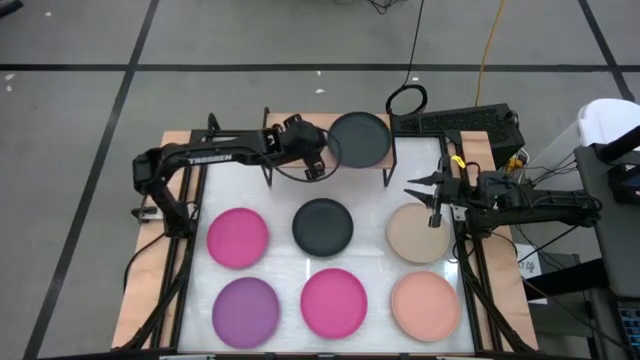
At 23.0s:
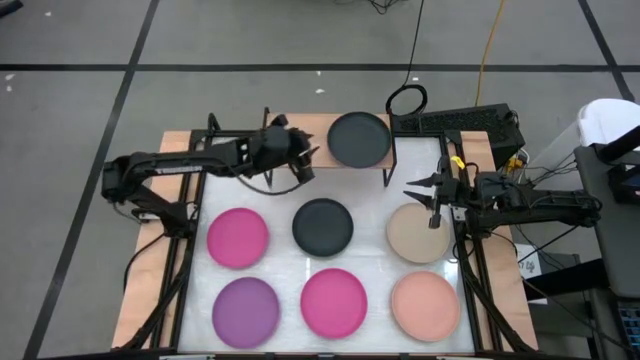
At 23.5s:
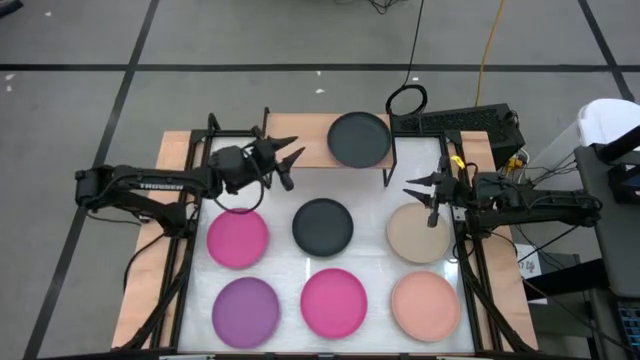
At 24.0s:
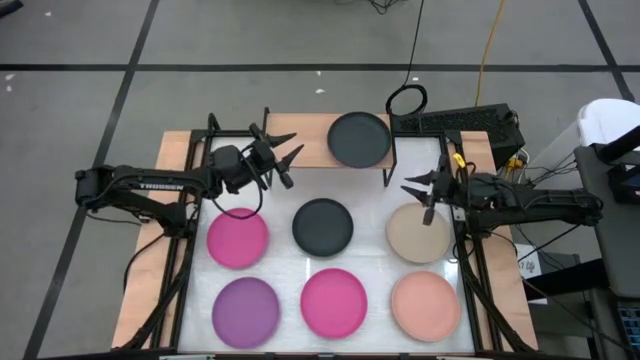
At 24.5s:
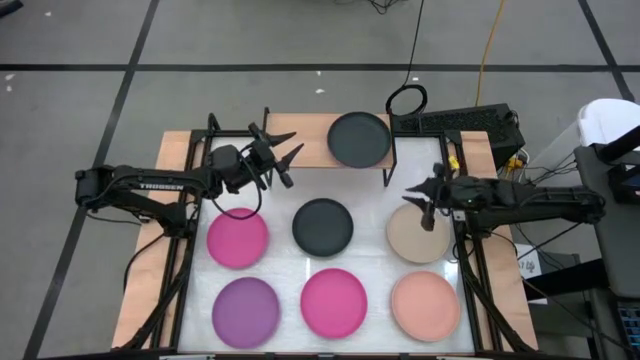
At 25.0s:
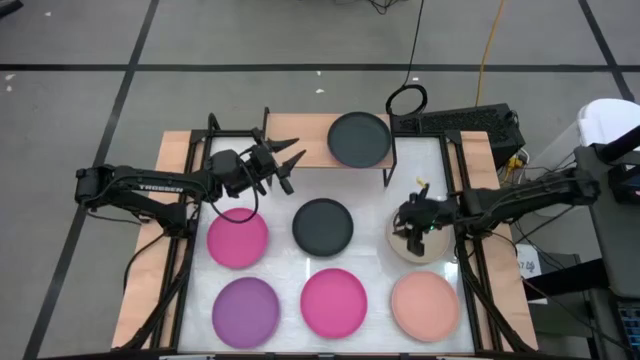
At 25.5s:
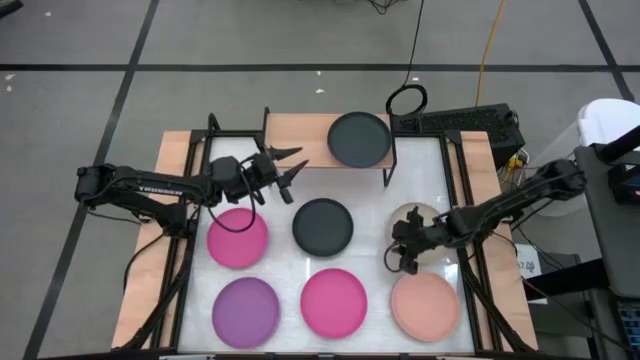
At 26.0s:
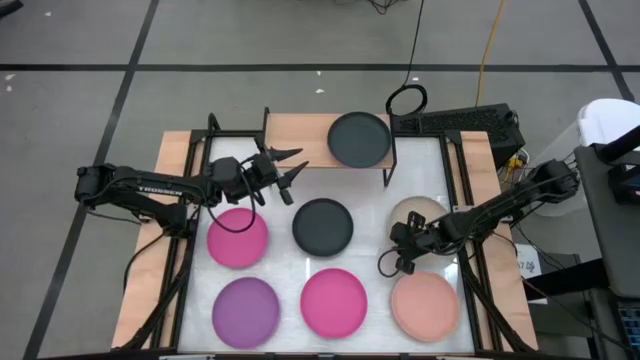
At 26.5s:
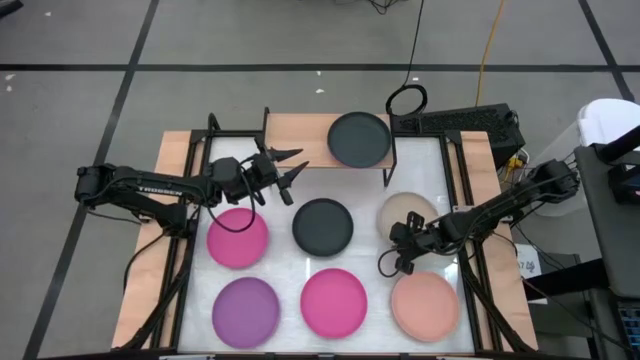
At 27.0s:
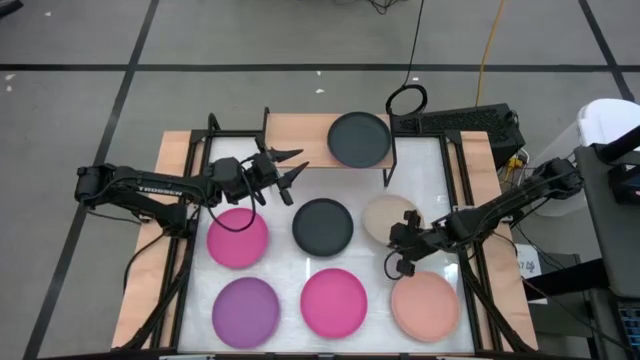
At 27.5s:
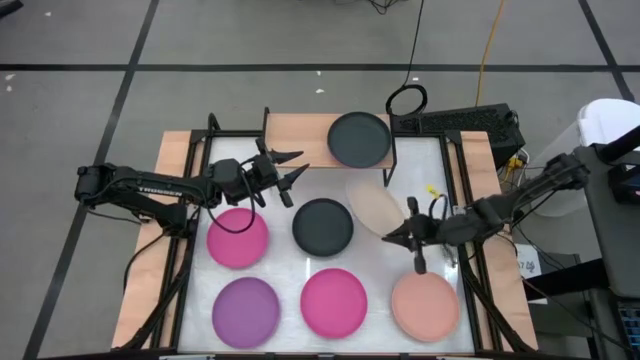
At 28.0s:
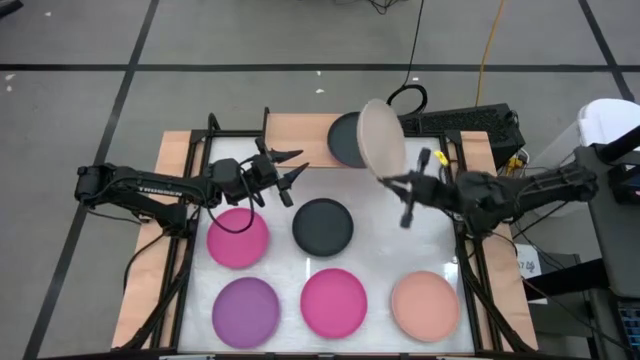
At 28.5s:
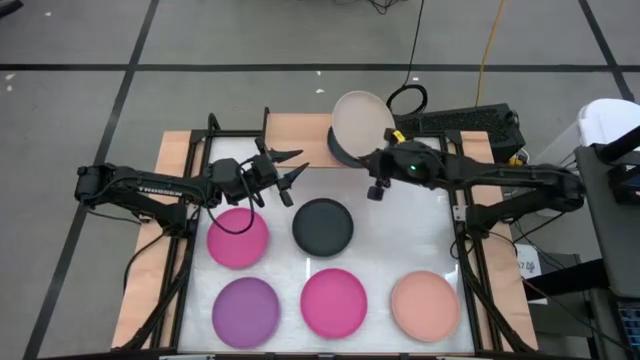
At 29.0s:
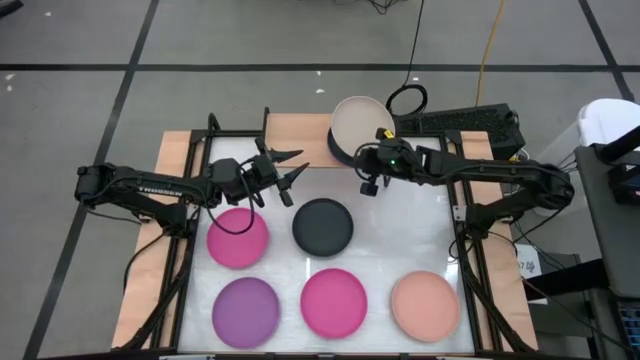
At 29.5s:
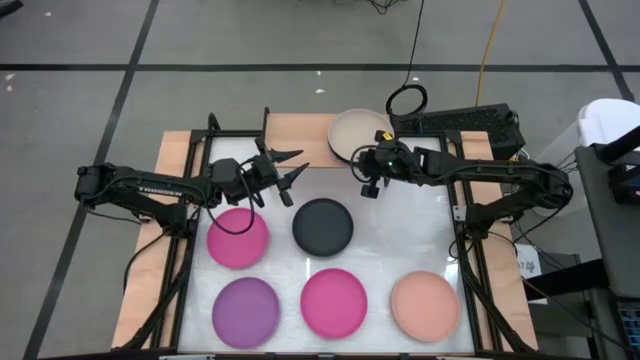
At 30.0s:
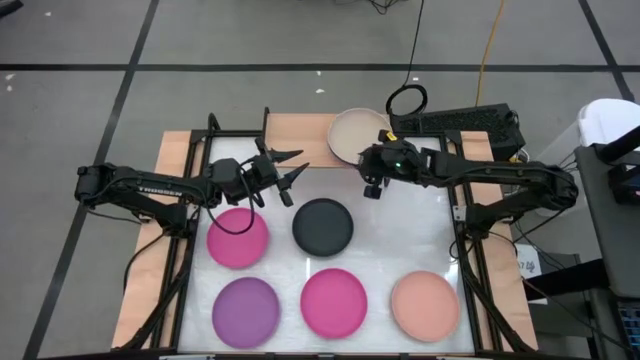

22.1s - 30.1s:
Task: Place and stack plates onto a shelf
Stack the dark white plate on top of the black plate on the shelf

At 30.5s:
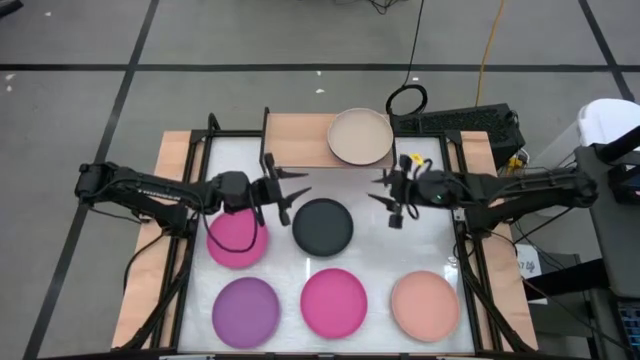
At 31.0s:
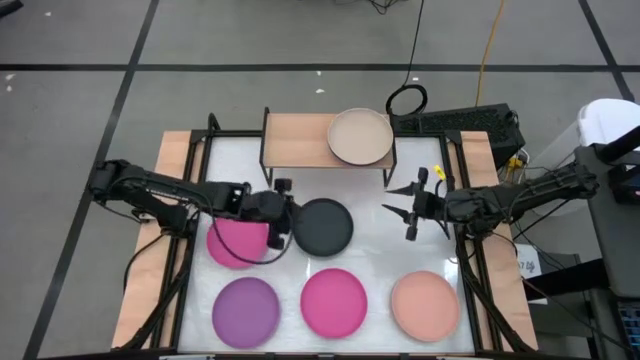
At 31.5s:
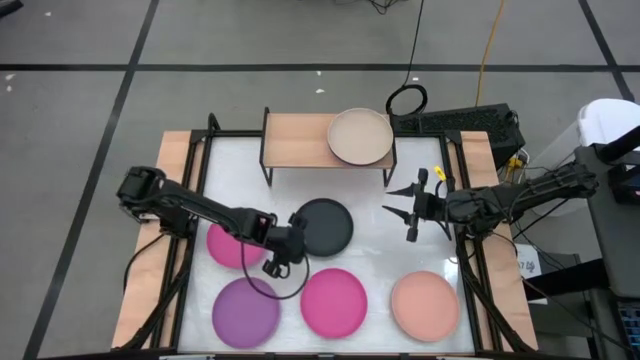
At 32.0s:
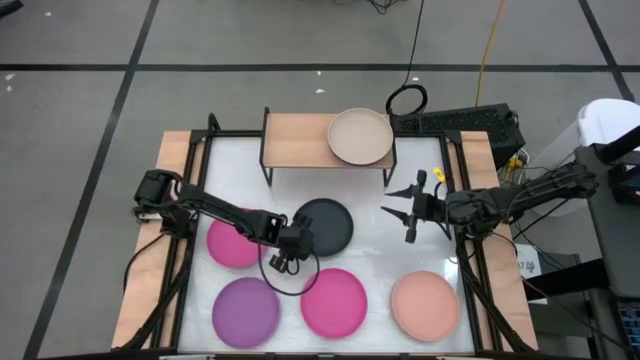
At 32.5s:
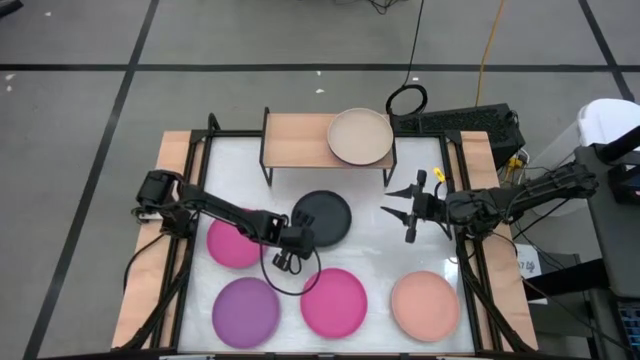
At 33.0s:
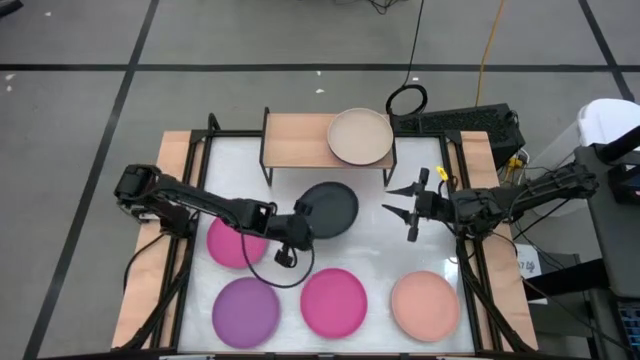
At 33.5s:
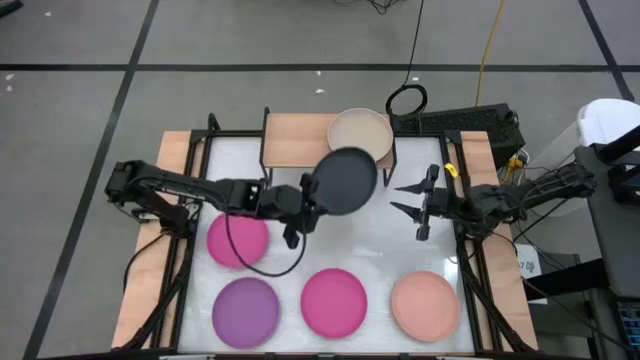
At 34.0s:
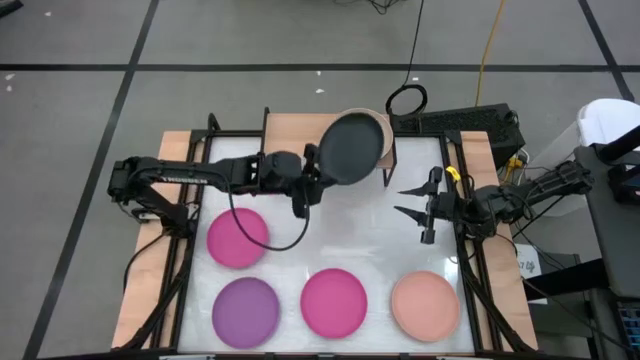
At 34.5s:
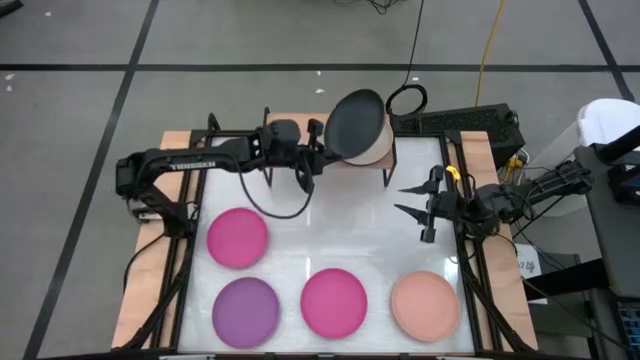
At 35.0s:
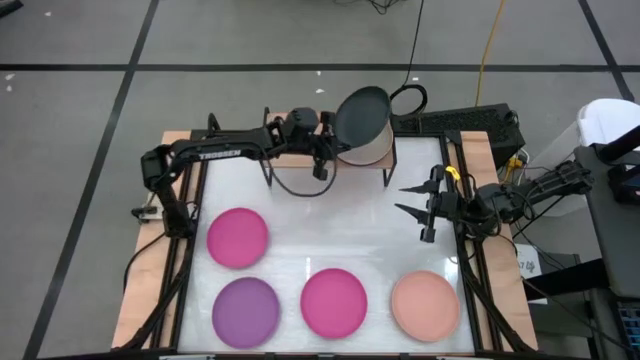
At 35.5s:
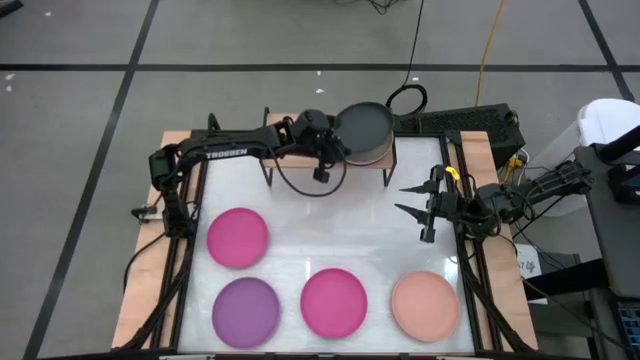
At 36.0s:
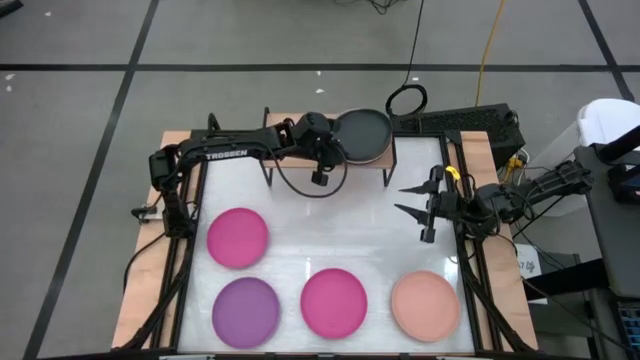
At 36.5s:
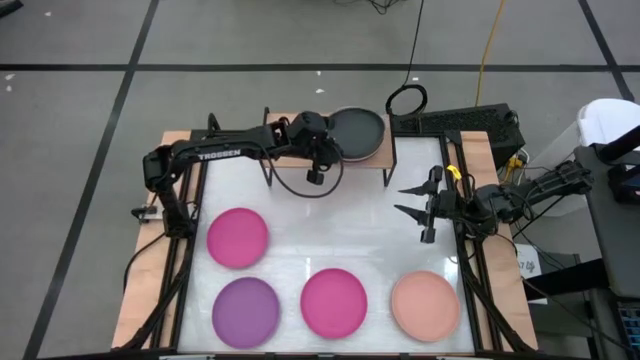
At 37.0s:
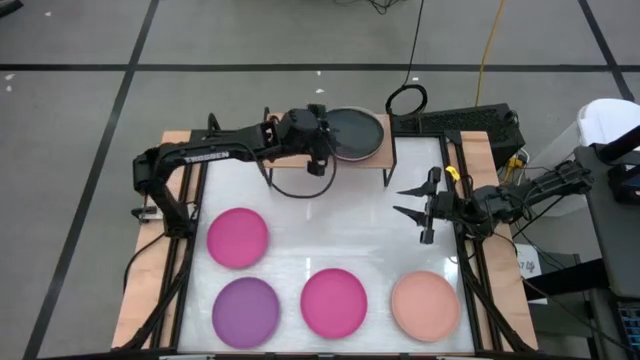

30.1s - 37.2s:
Stack the black plate on top of the dark white plate on the shelf

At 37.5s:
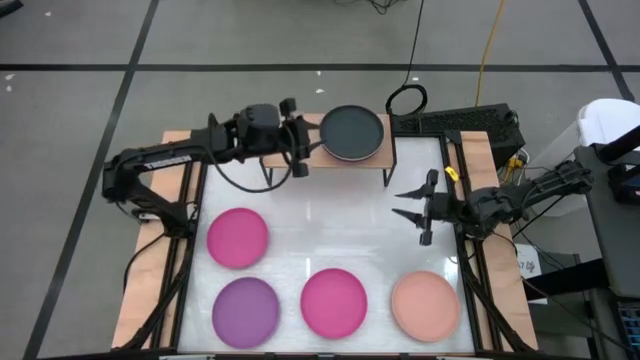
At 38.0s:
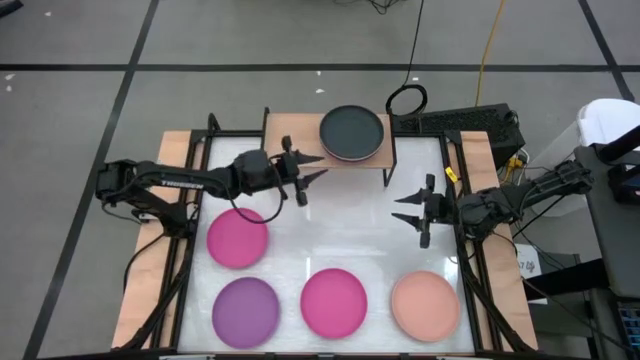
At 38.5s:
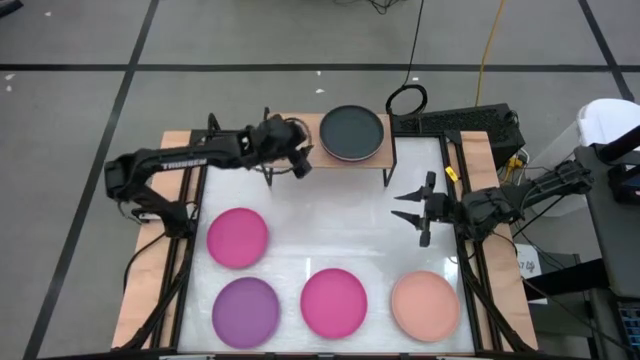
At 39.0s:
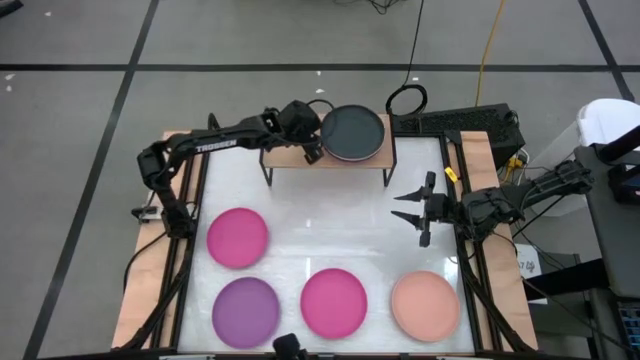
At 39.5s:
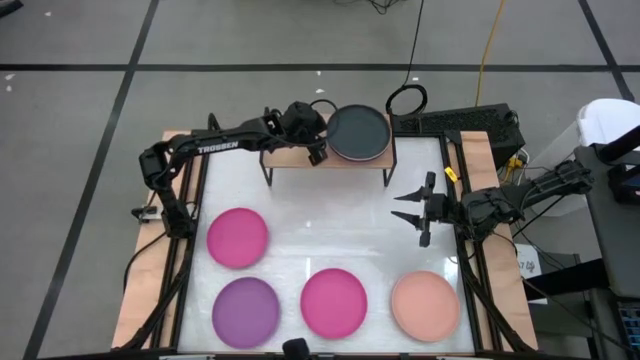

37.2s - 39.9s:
Adjust the plates on the shelf

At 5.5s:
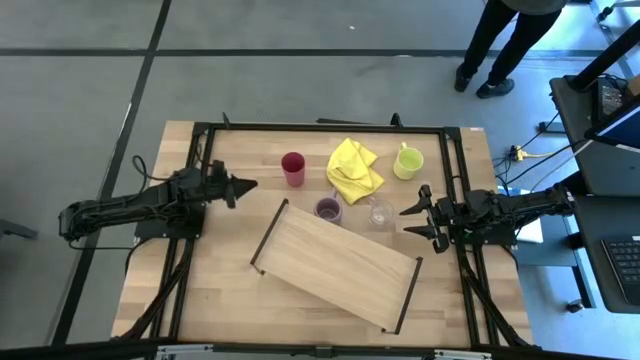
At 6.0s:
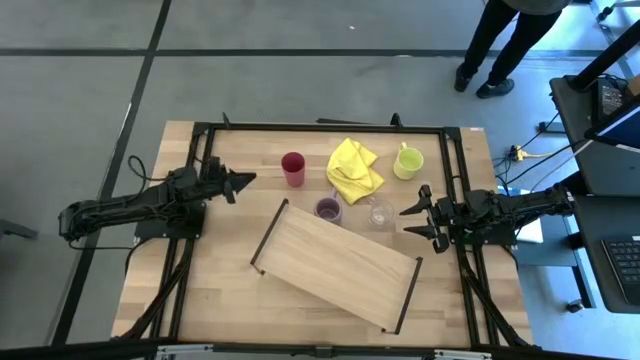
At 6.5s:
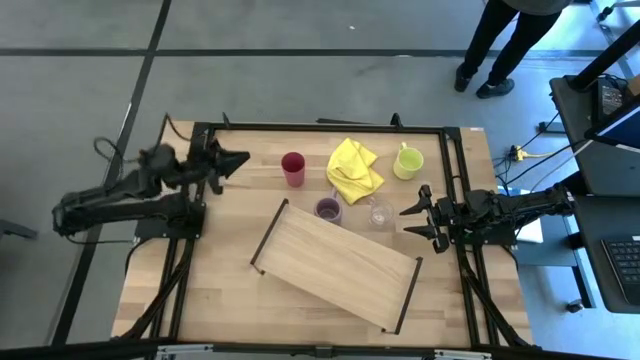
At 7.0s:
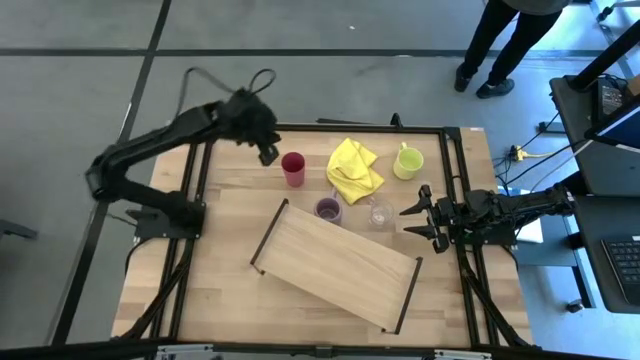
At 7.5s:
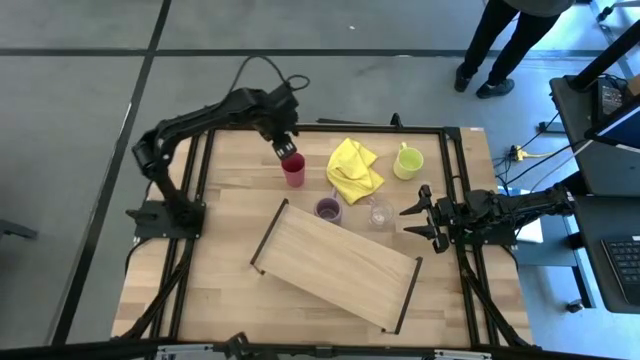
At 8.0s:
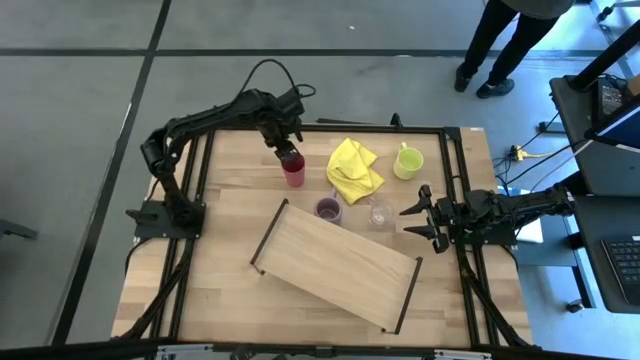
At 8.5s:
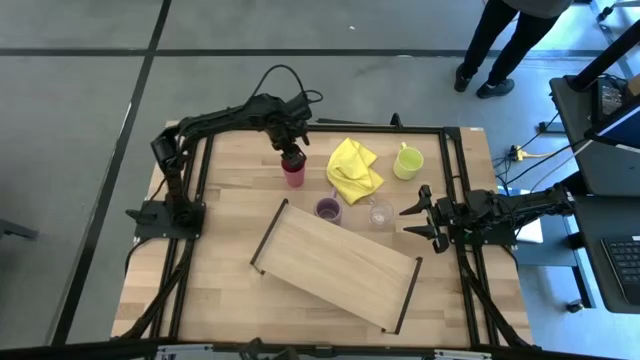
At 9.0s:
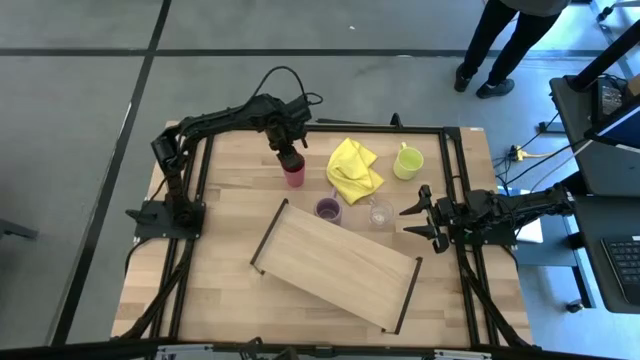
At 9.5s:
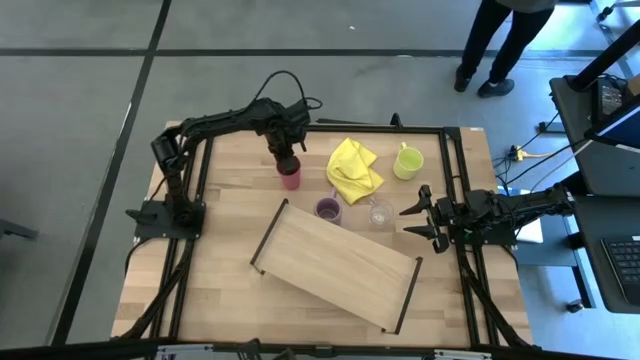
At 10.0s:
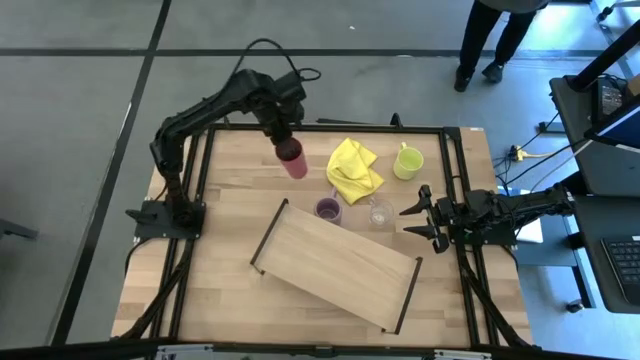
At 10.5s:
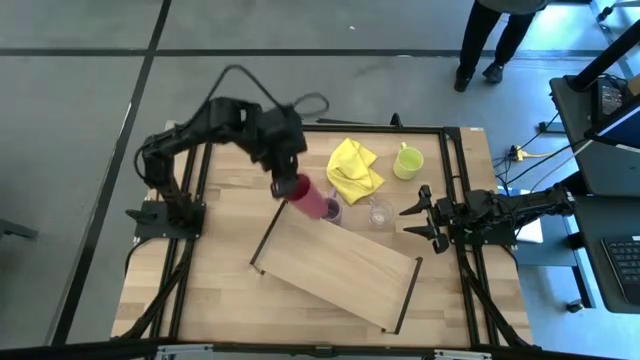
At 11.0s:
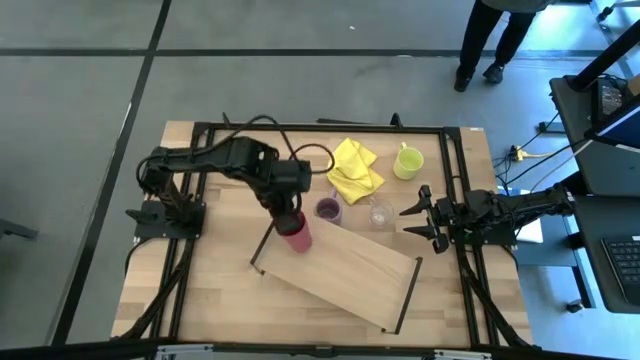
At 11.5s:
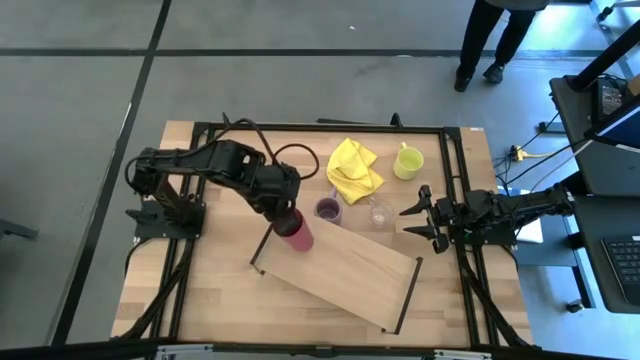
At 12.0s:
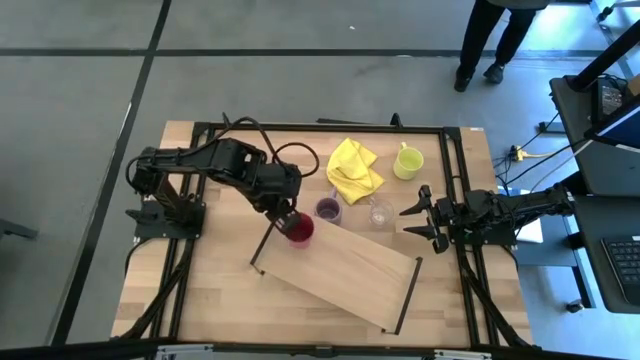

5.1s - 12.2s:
Task: Stack small to large cups/mugs on shelf
Put the pink cup on the shelf
